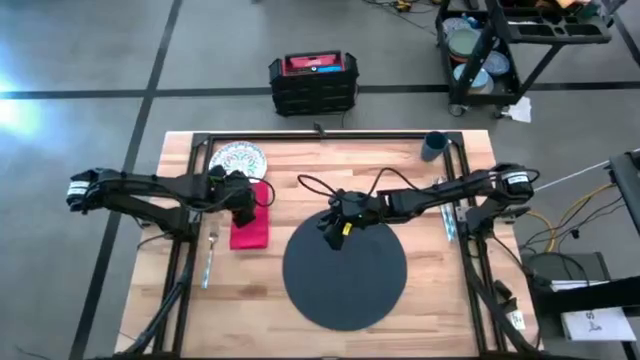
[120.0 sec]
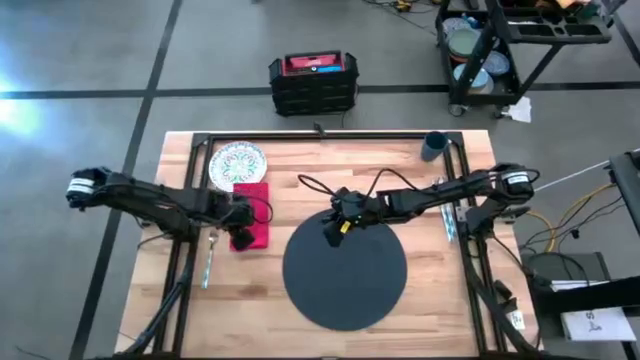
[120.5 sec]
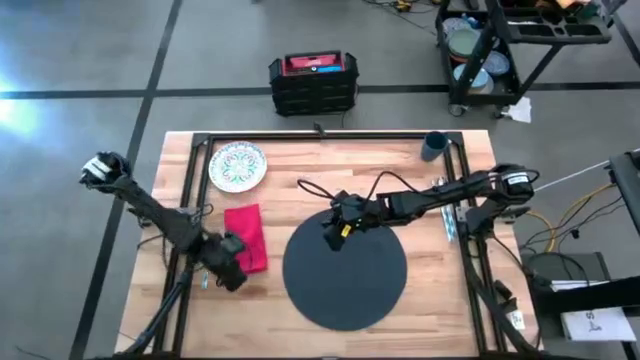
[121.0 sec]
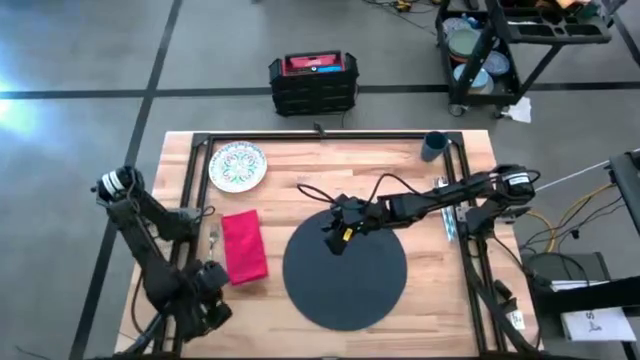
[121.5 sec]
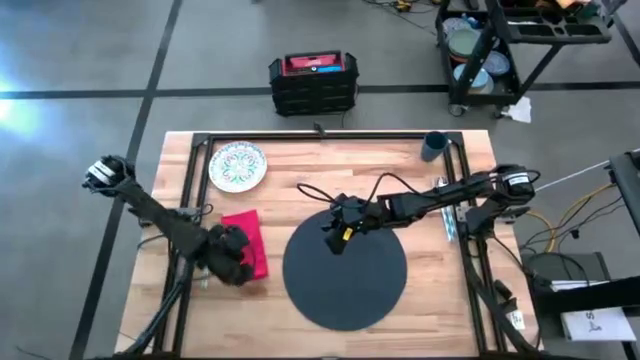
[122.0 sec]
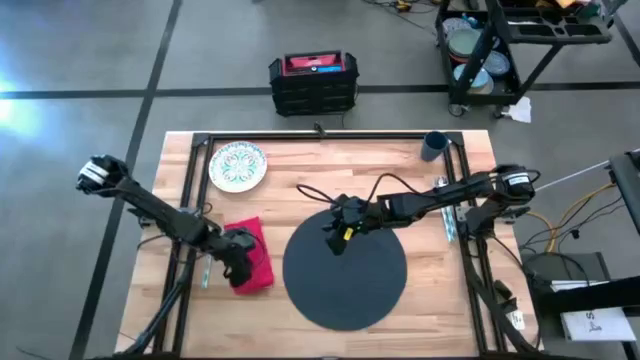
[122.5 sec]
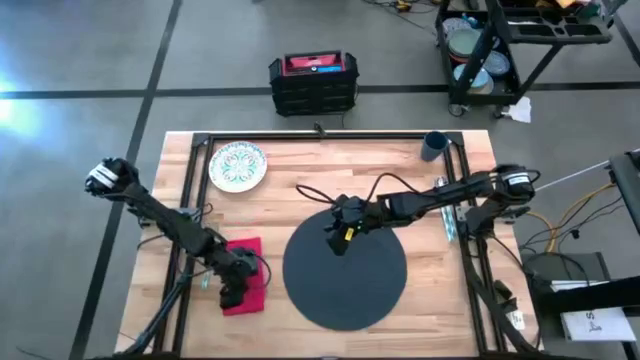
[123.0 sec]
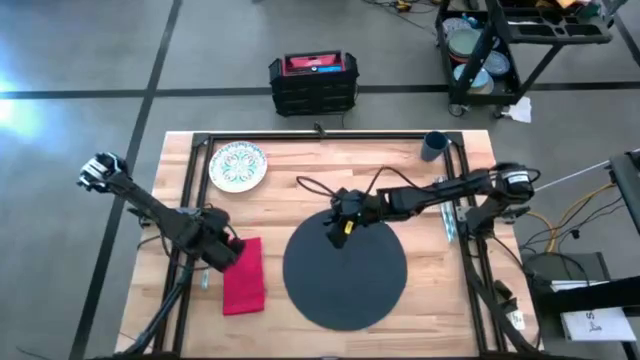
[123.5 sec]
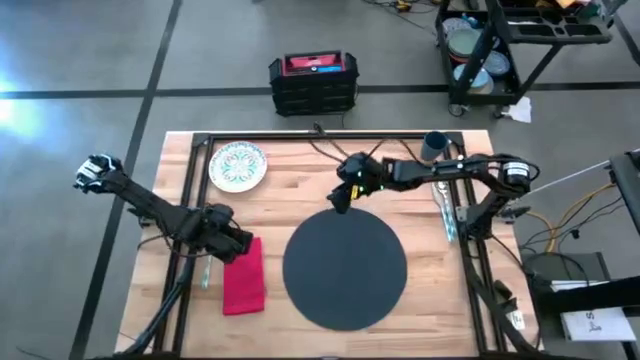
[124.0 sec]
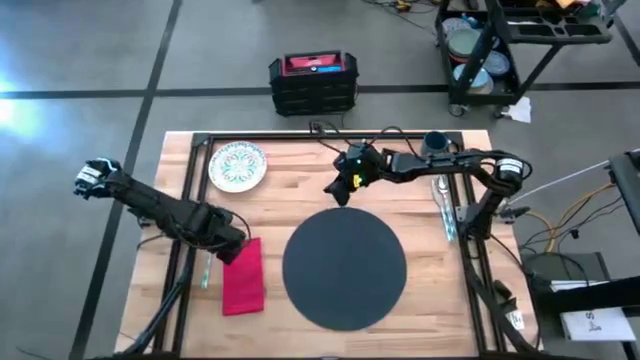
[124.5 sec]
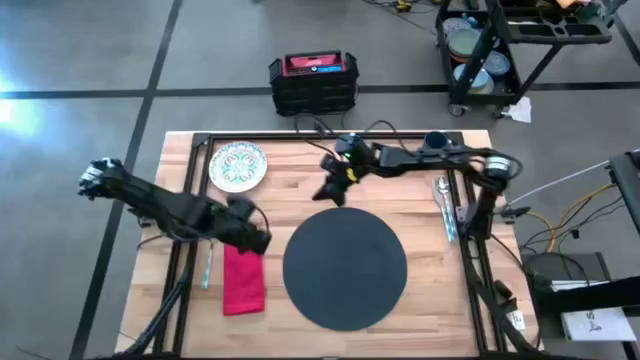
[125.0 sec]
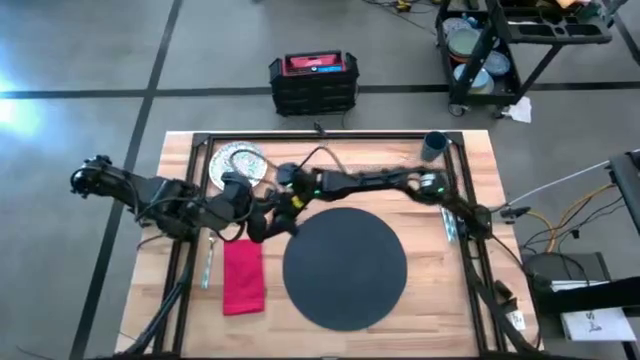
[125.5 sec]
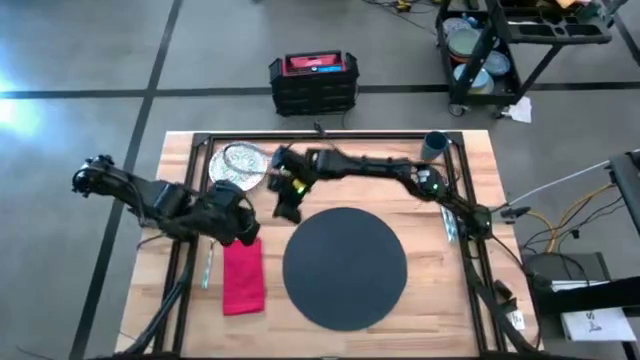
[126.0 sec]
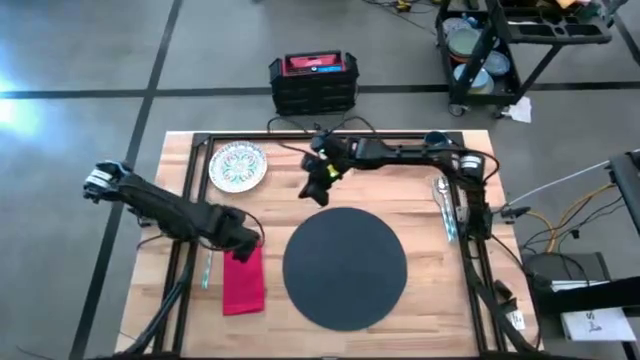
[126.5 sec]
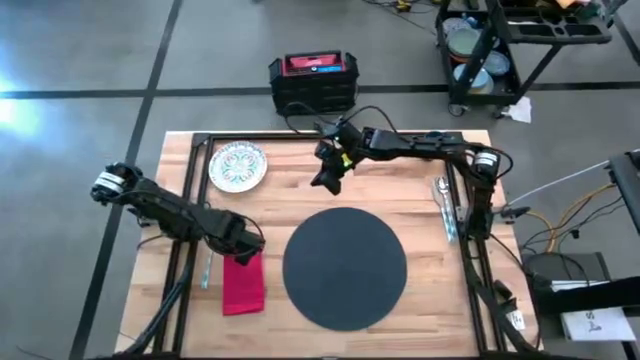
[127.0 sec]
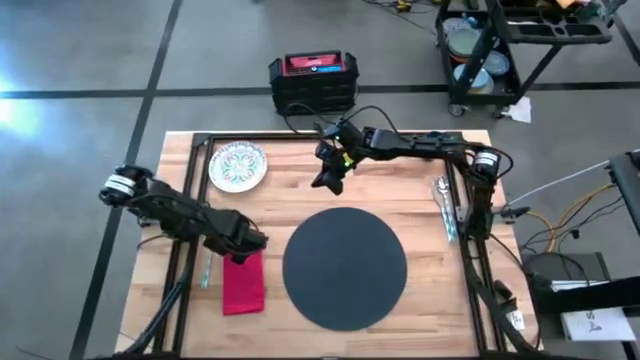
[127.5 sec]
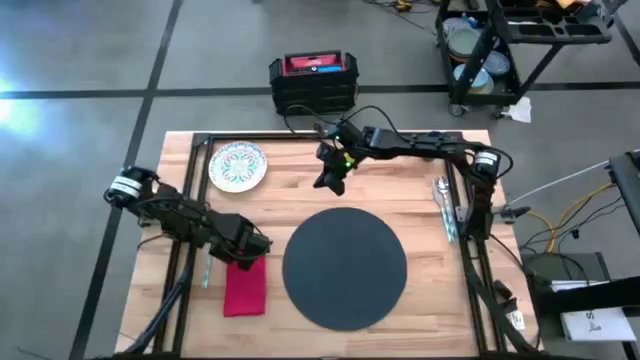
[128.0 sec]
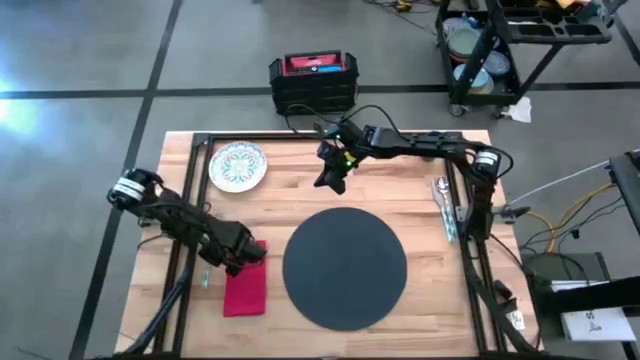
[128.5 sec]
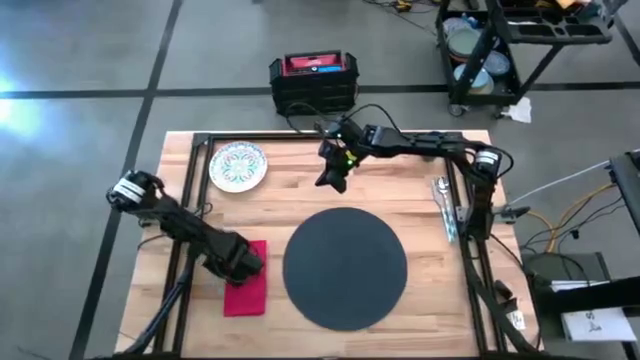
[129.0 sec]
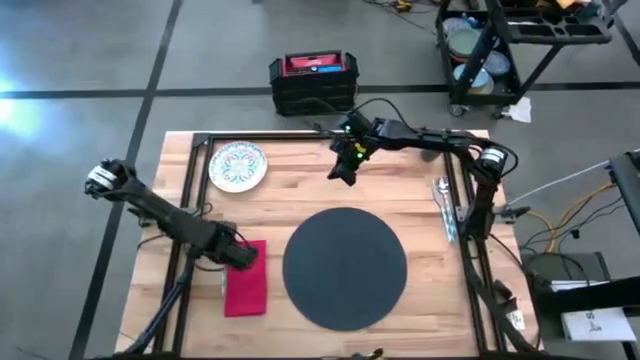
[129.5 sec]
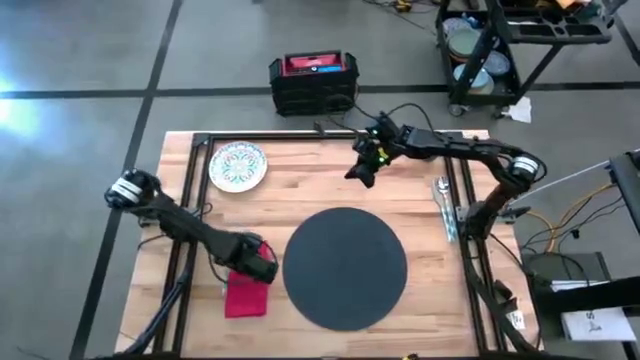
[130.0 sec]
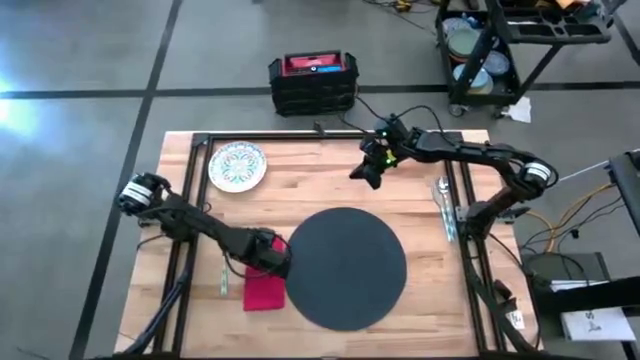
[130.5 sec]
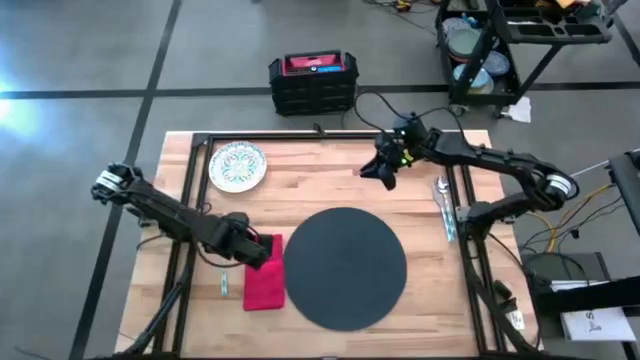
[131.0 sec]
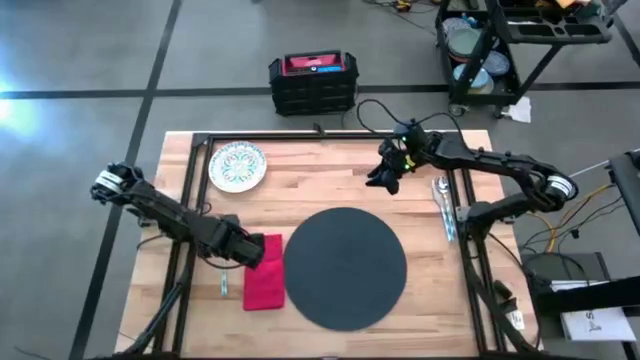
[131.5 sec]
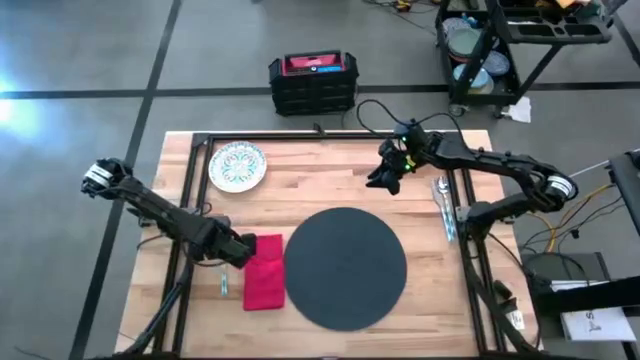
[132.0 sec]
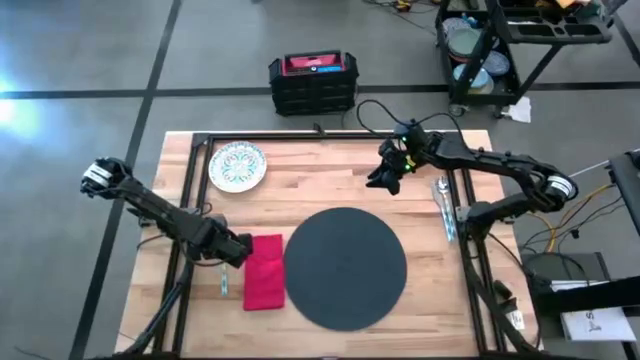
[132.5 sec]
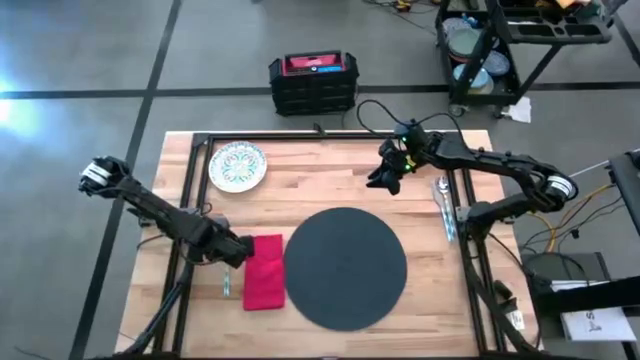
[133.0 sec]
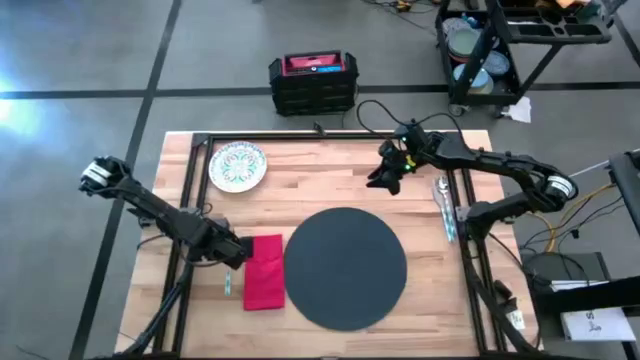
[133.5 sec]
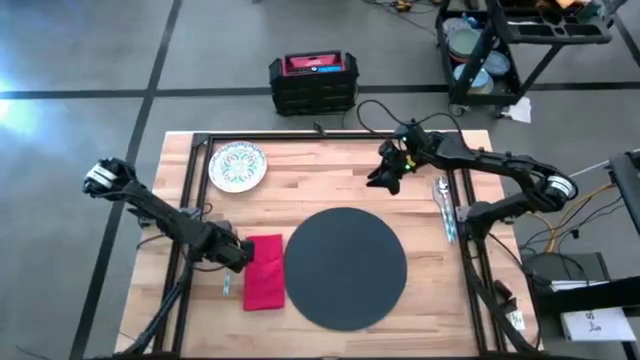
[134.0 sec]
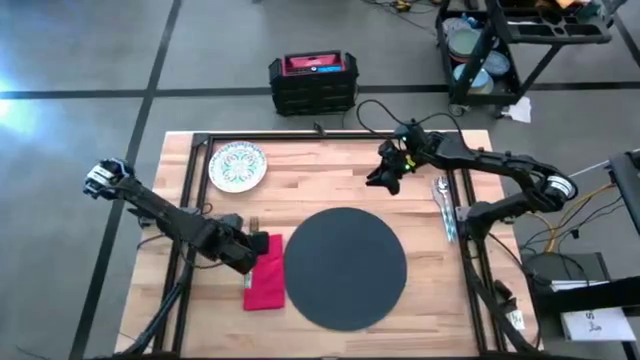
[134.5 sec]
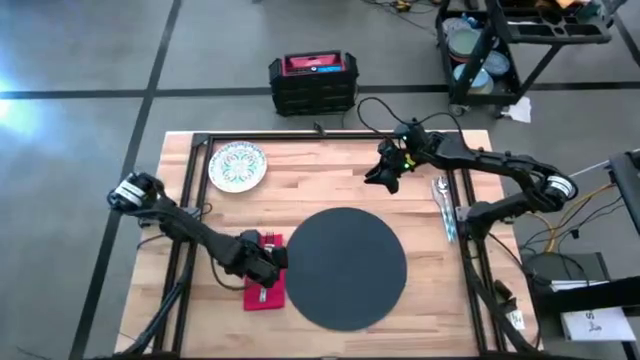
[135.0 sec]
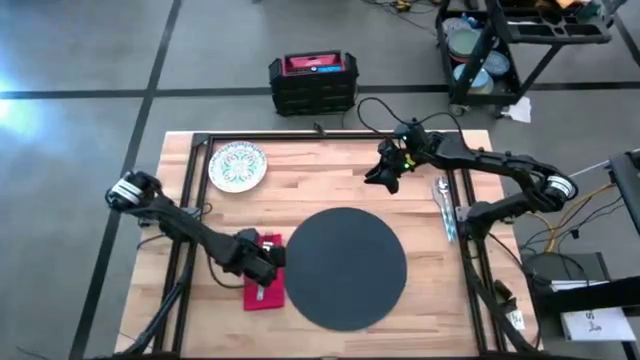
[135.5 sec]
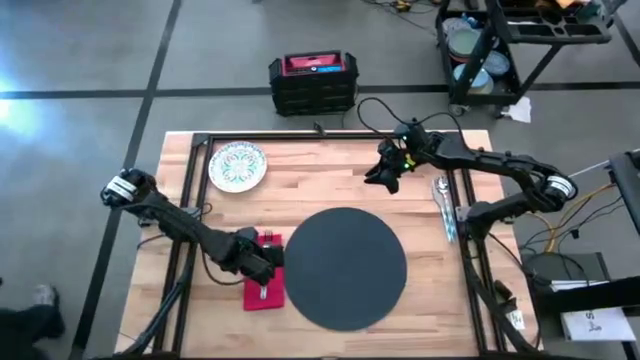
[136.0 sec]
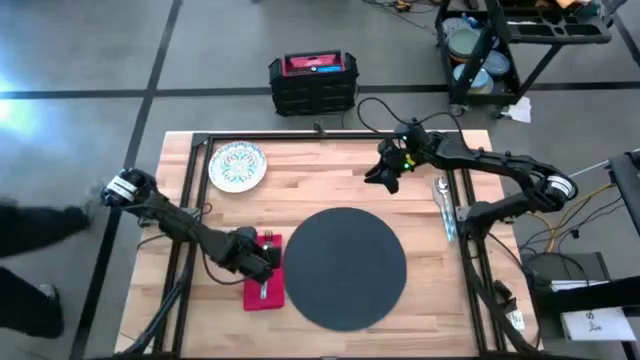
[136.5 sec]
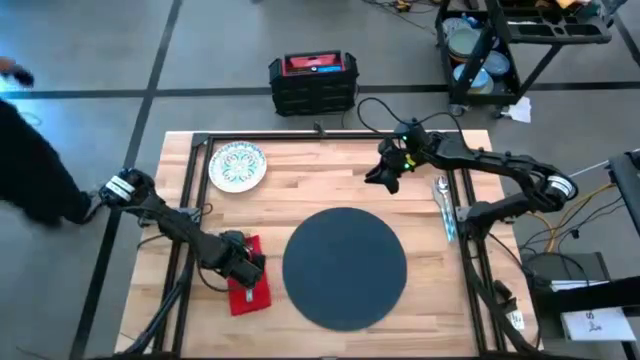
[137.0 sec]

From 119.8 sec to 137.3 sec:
Task: Set table place
Put the blue fork on the red napkin

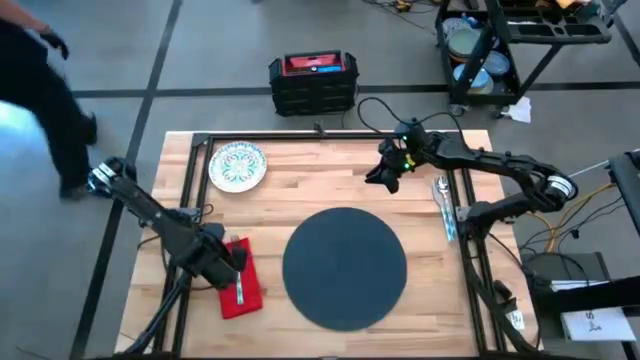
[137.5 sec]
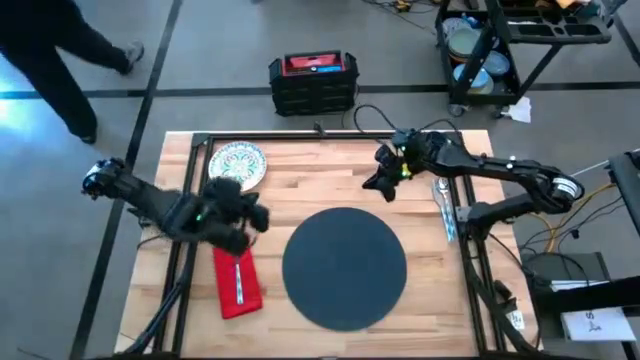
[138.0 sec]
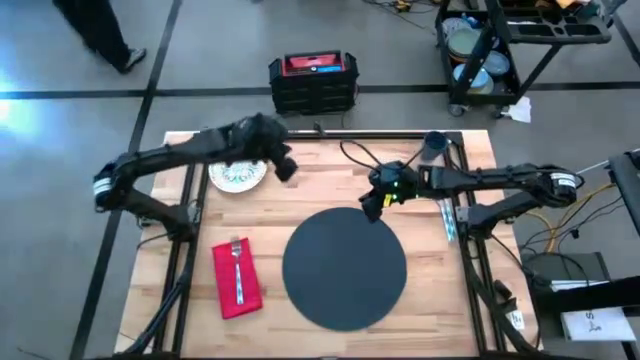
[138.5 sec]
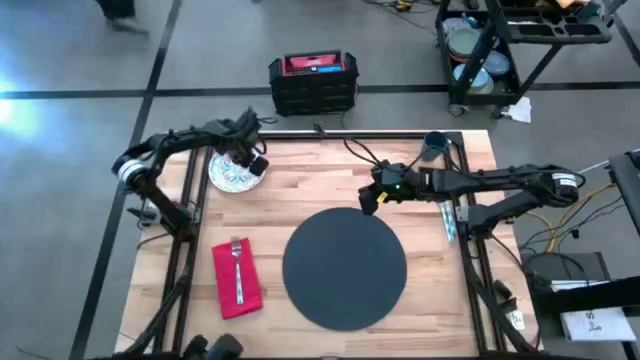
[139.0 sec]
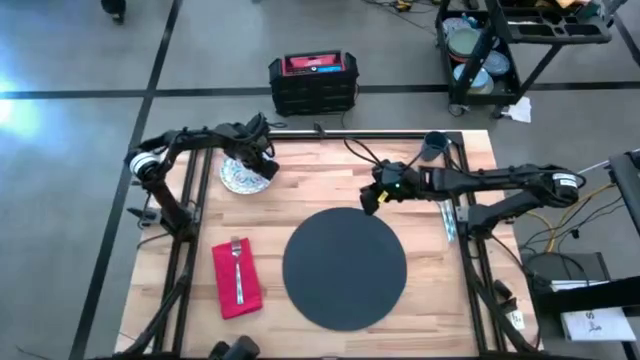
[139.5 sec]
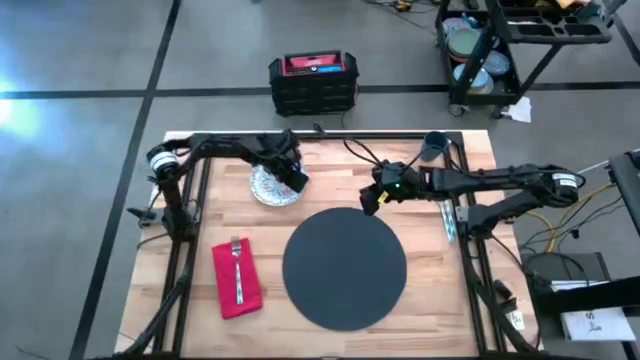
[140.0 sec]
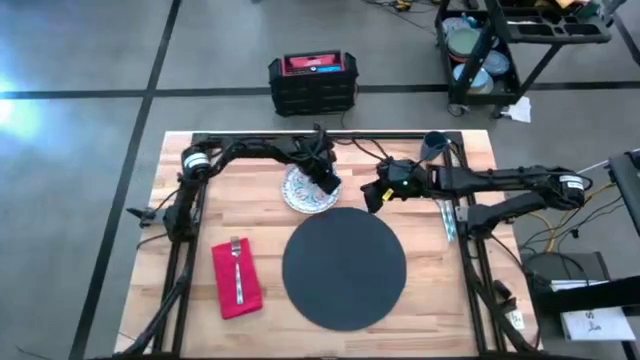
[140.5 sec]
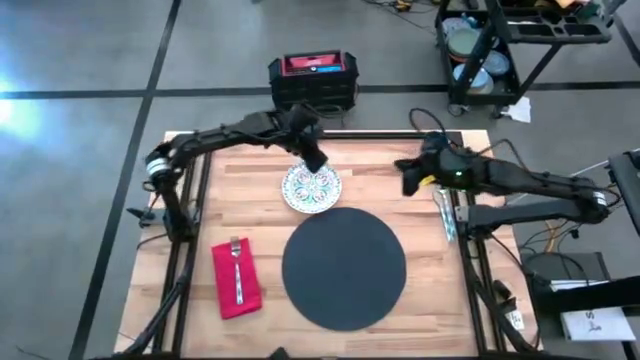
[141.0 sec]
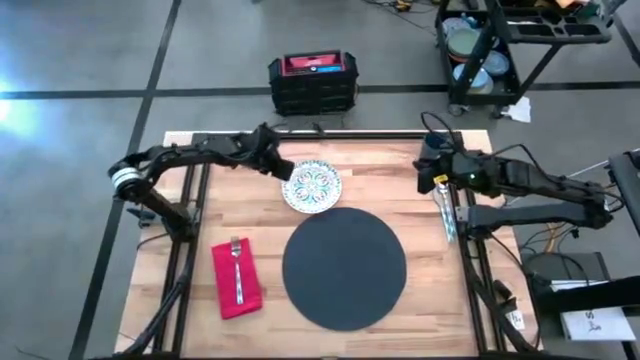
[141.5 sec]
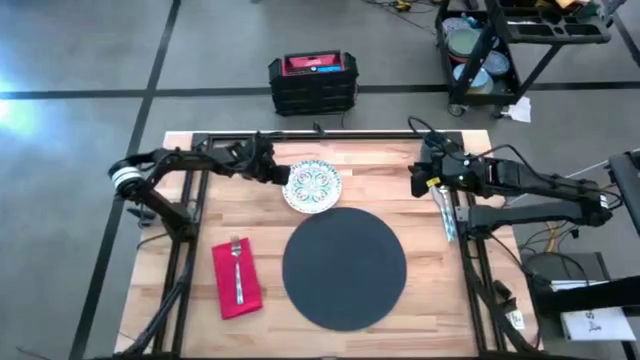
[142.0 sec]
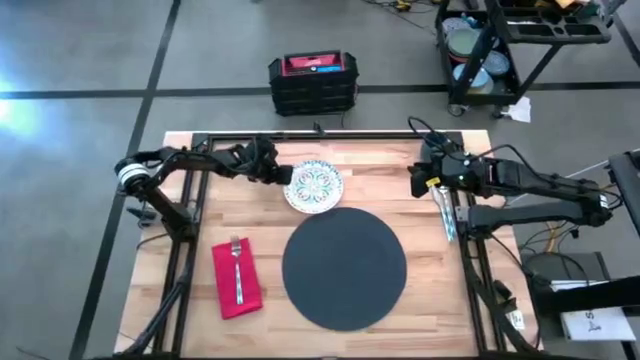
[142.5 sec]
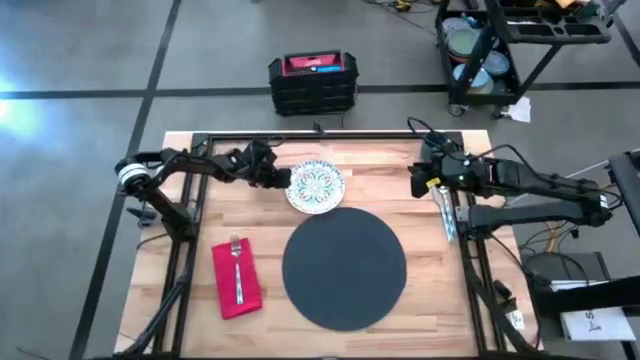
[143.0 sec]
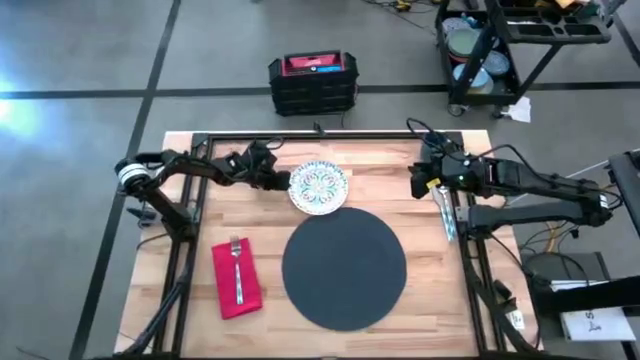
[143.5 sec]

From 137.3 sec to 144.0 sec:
Put the blue patterned plate on the black placemat
